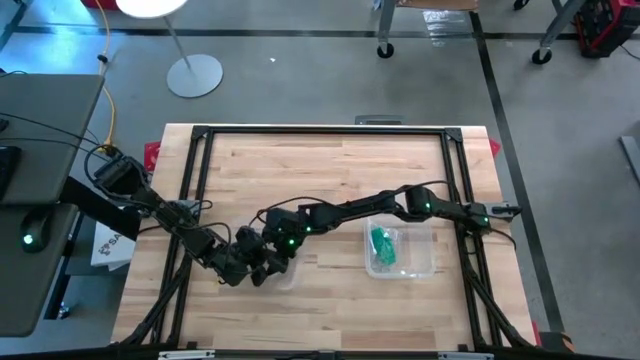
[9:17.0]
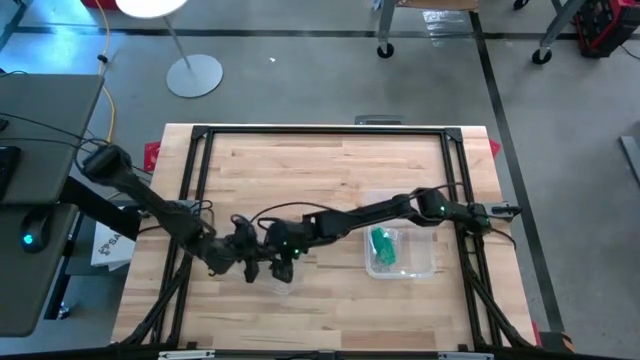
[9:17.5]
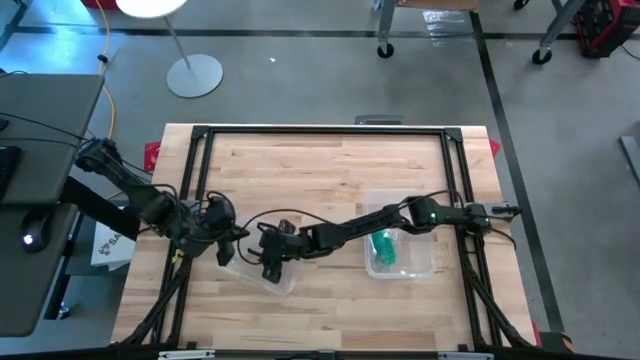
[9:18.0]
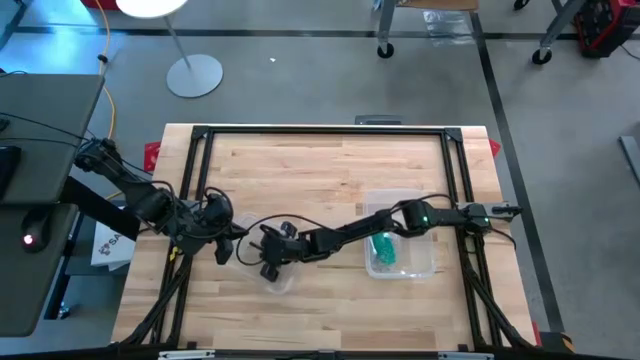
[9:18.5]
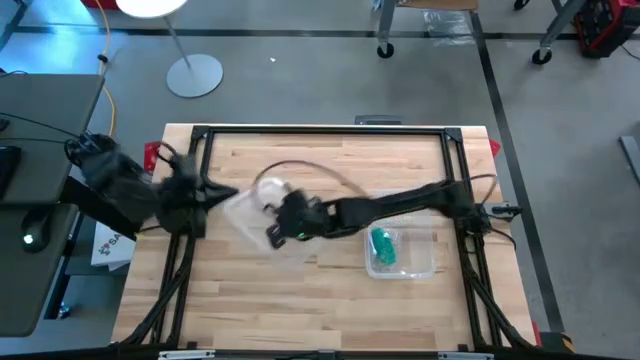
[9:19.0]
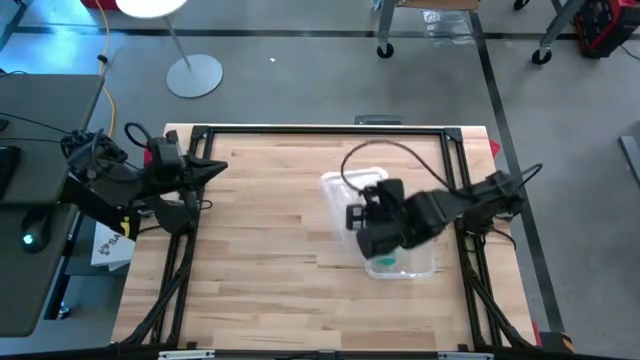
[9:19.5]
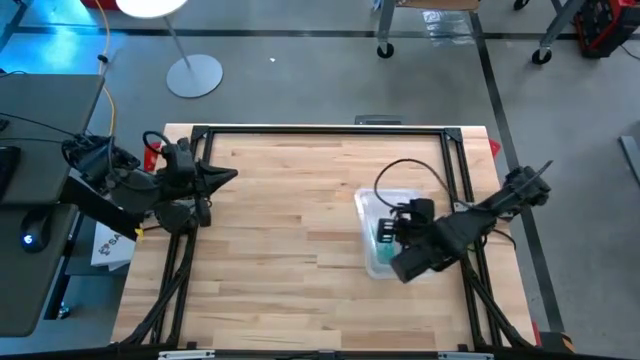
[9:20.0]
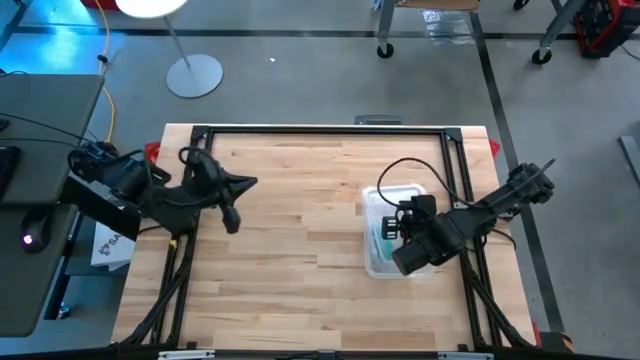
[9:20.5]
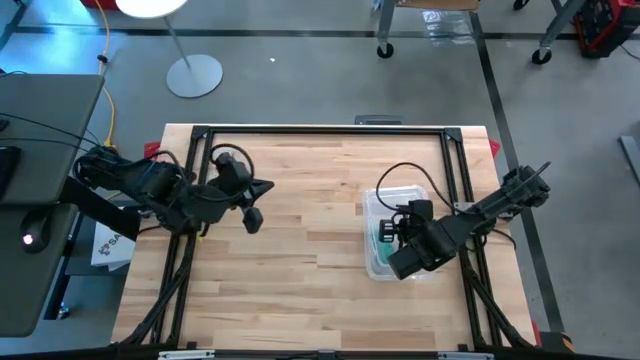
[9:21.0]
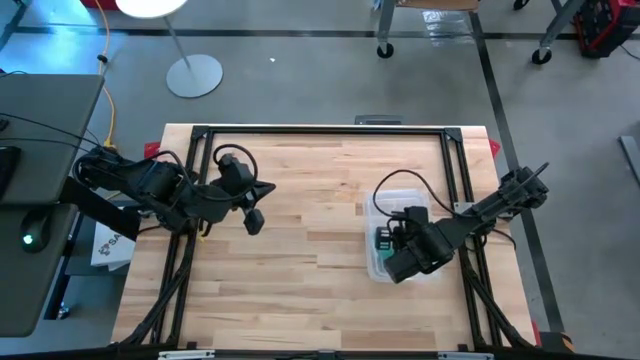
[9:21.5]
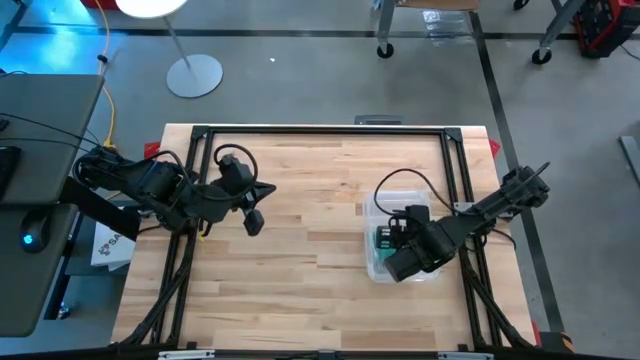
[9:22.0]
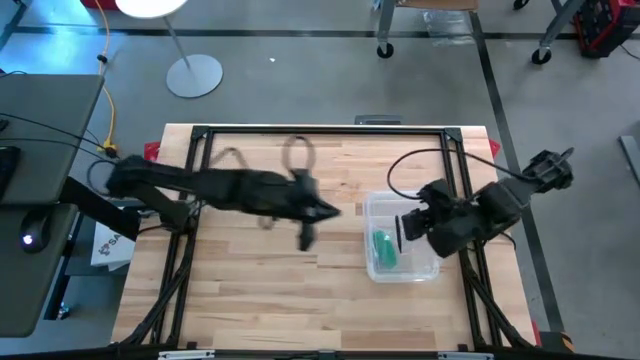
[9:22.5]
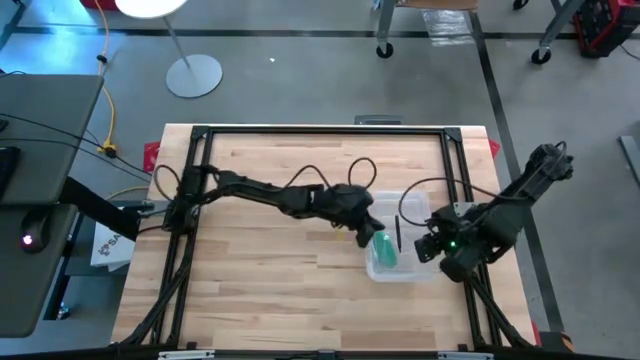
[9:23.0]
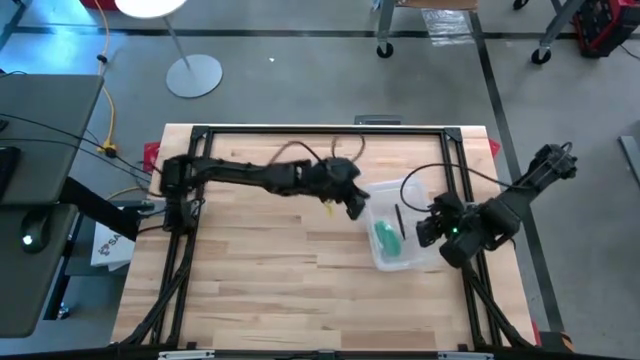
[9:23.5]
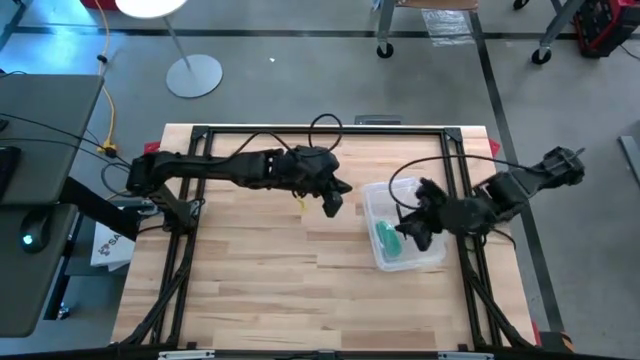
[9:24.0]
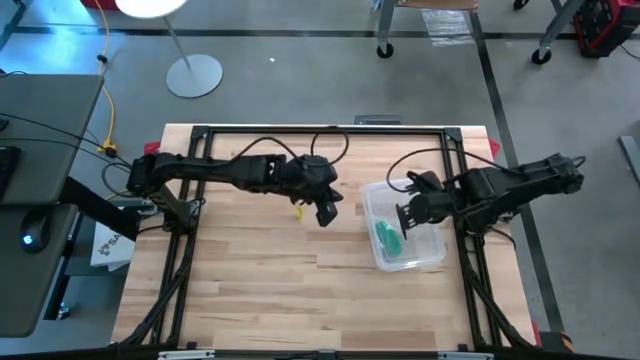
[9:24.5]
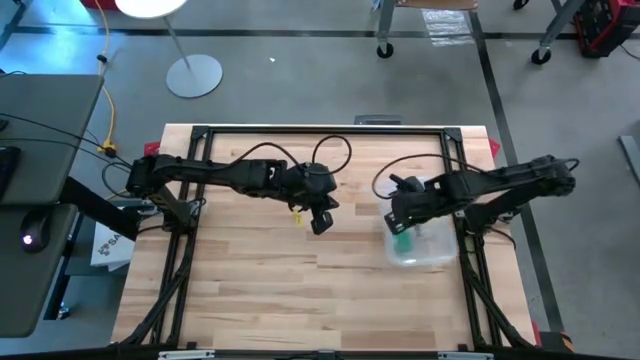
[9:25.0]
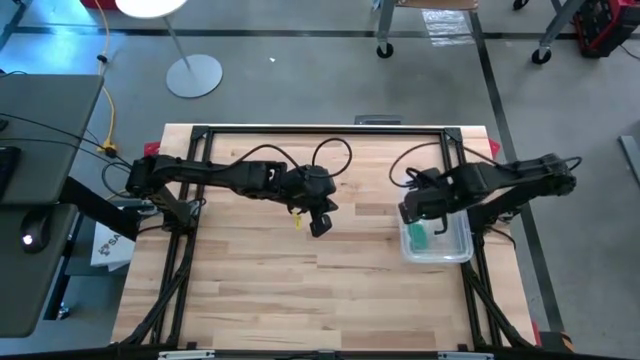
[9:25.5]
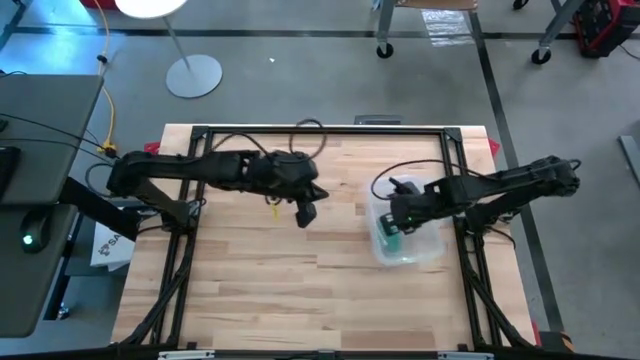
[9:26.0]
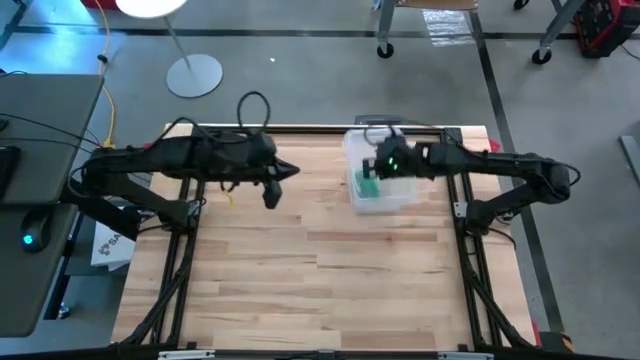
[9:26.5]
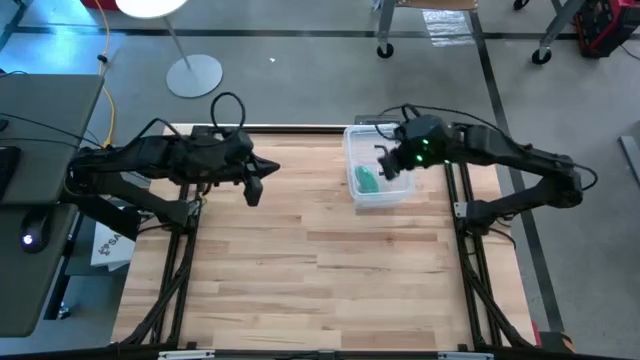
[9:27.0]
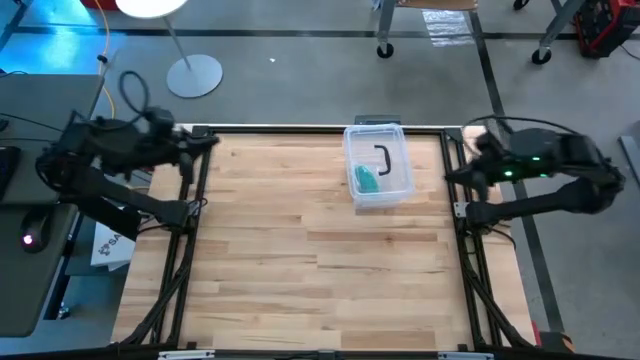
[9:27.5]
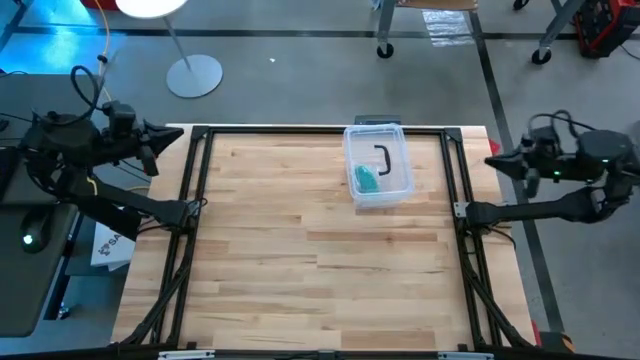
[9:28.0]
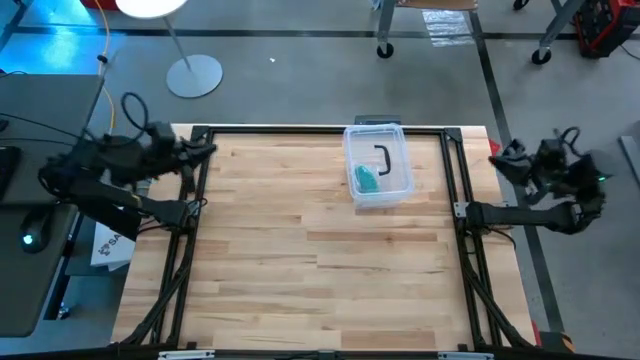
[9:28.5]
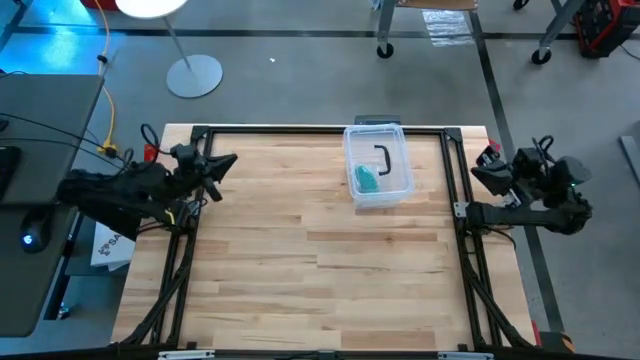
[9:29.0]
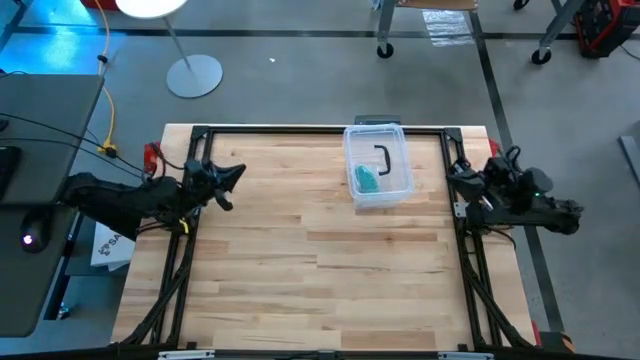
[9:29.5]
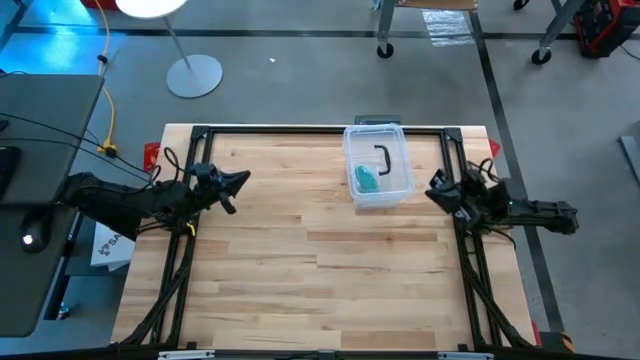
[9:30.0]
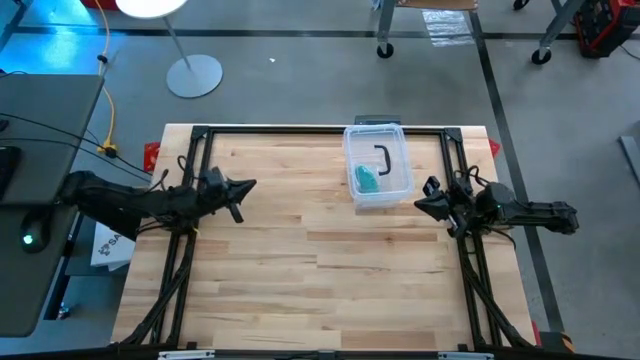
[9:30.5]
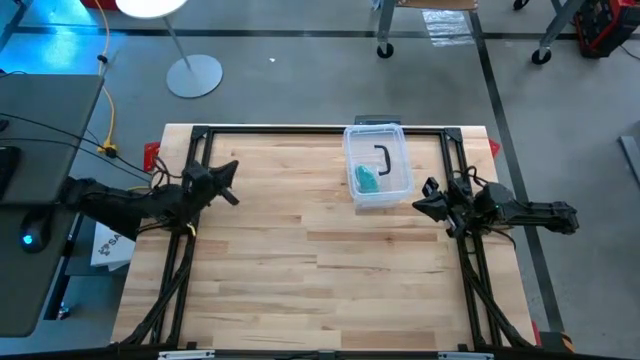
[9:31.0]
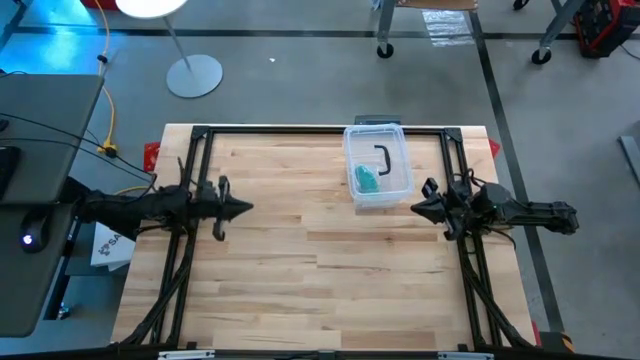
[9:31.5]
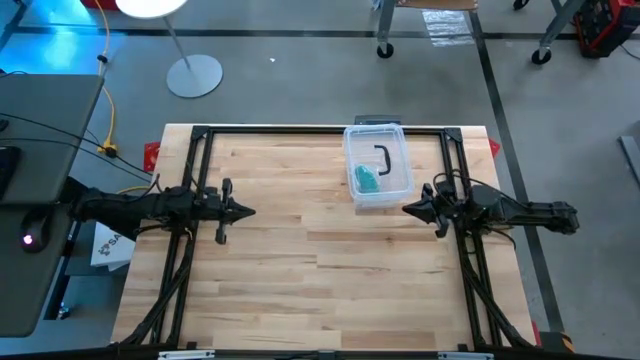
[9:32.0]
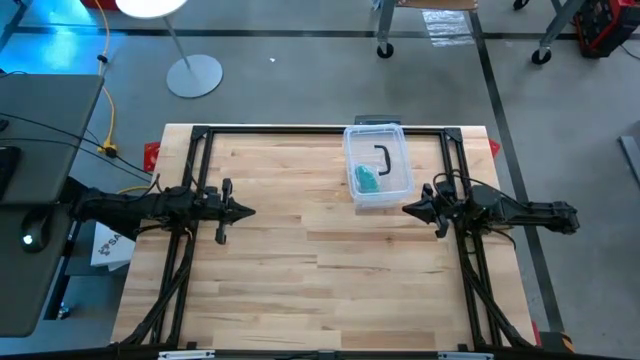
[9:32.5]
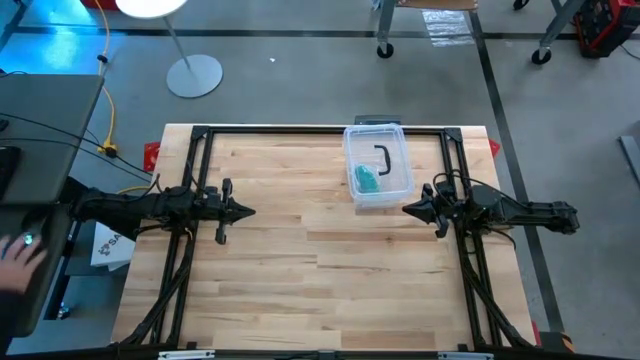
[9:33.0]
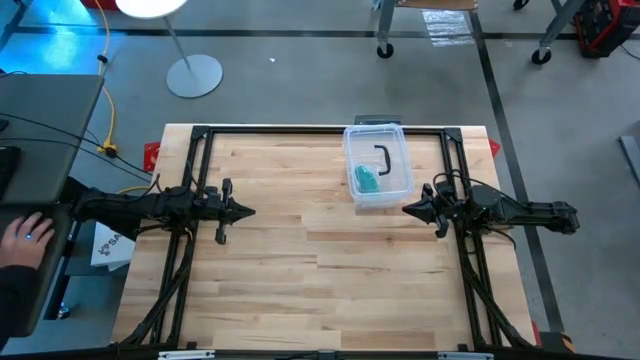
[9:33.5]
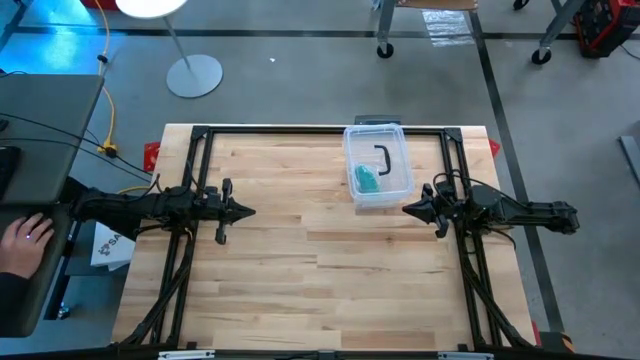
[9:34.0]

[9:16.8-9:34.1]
Task: Roll bandage
Return to Home Position

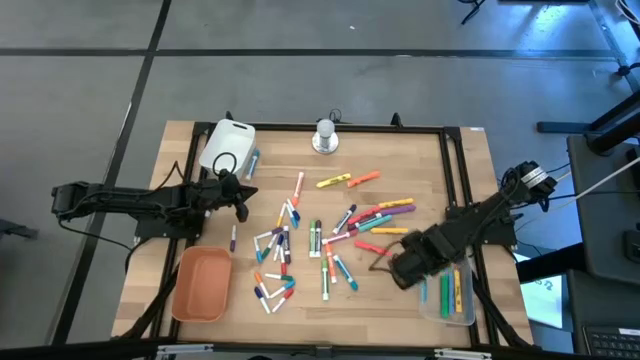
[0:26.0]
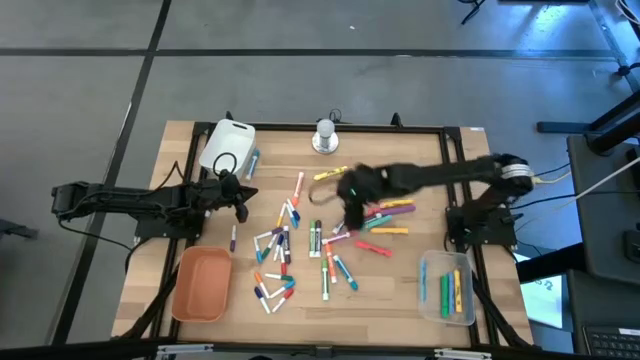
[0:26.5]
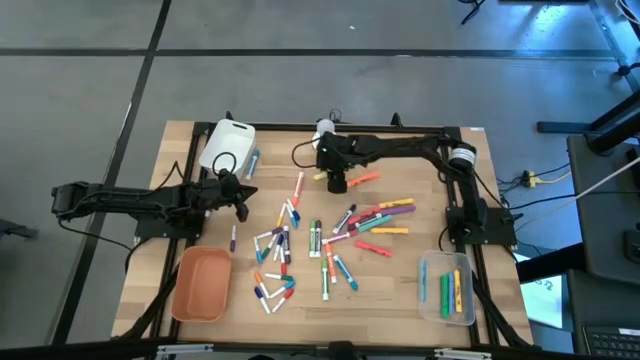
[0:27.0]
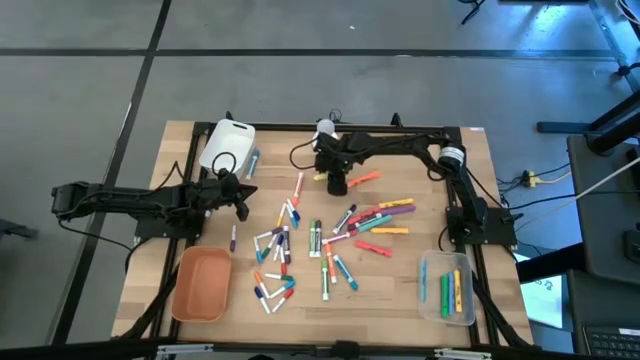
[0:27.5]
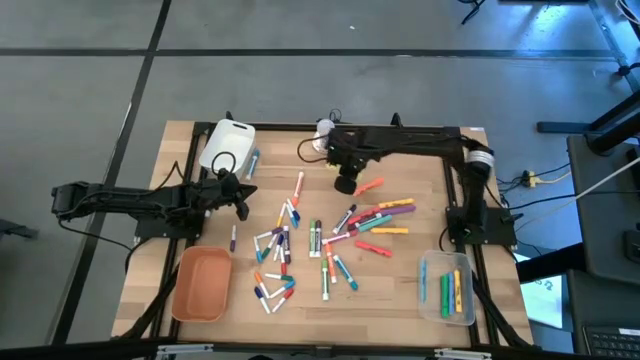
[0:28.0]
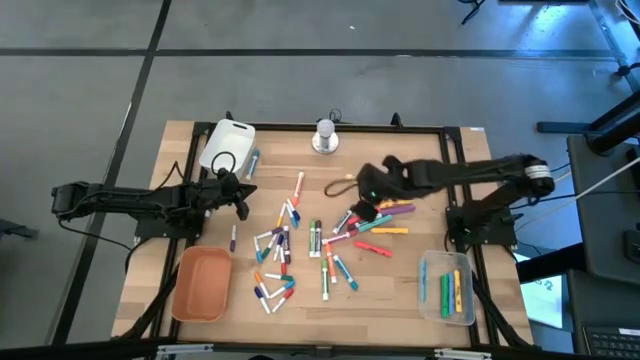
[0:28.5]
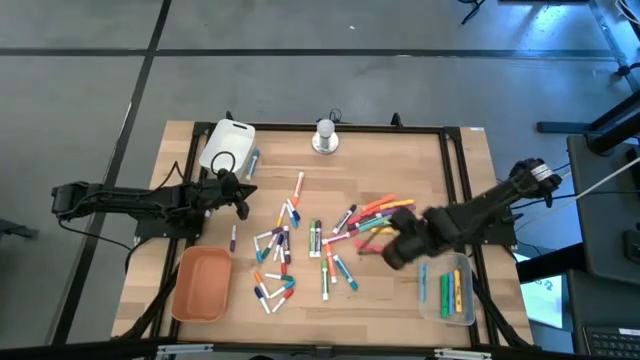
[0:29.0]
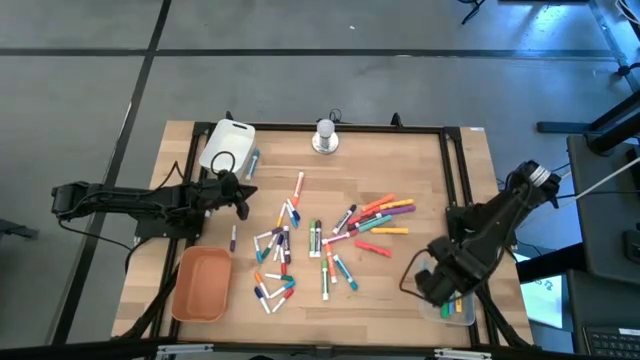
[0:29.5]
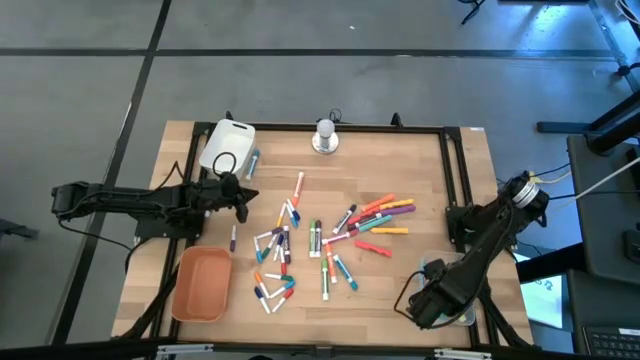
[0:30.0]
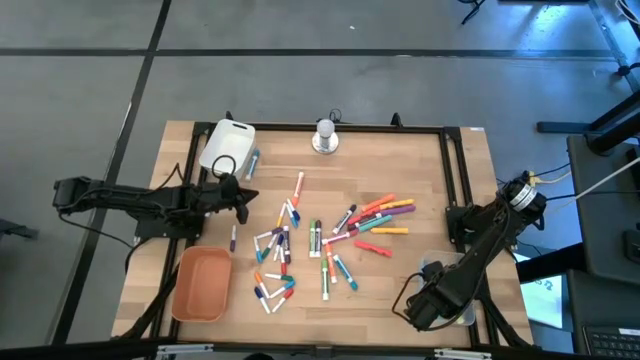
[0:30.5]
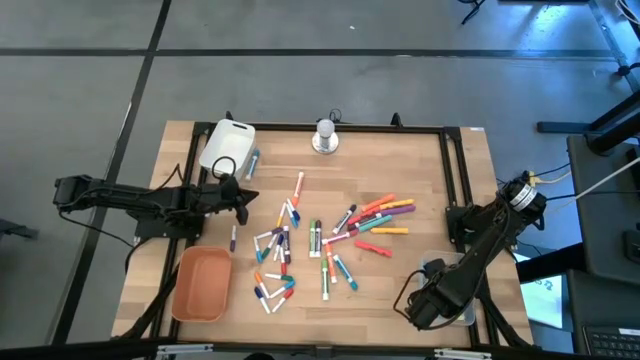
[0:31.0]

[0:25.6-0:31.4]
Task: Pick & Place Markers
Put the yellow highlighter pen into the transparent bin
